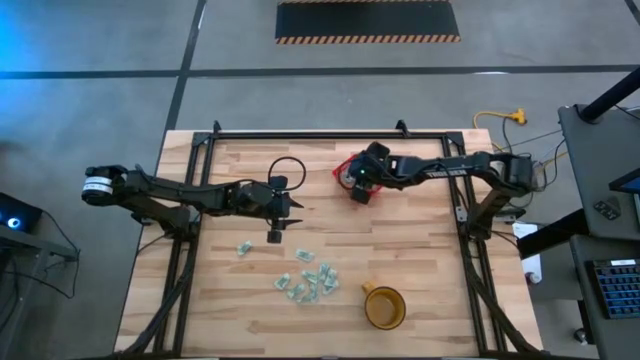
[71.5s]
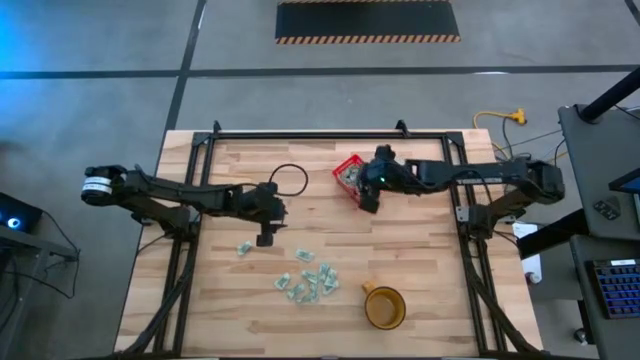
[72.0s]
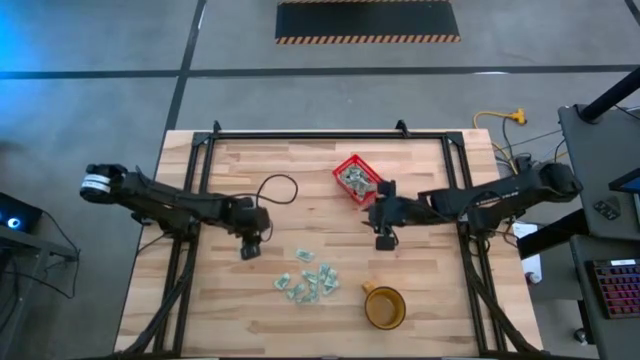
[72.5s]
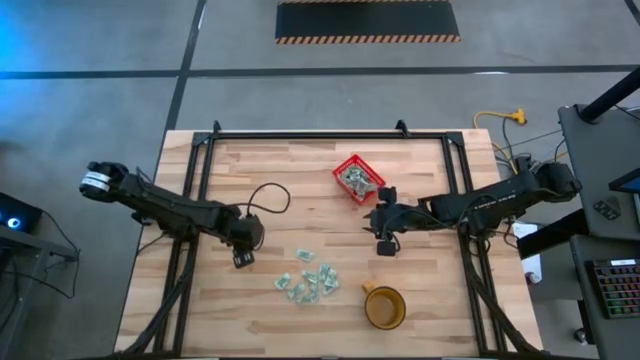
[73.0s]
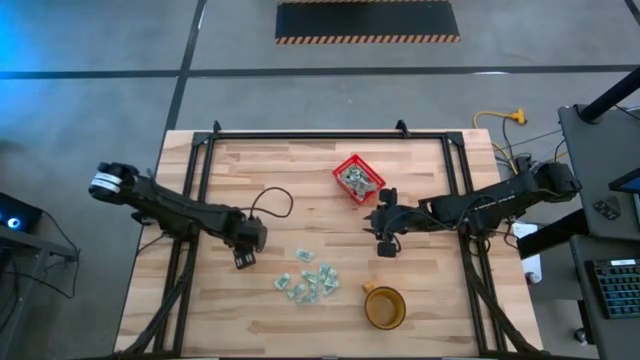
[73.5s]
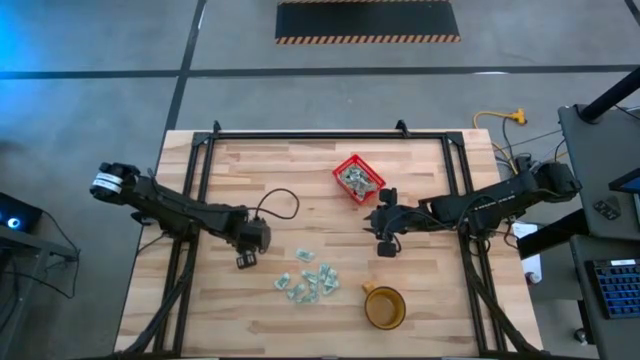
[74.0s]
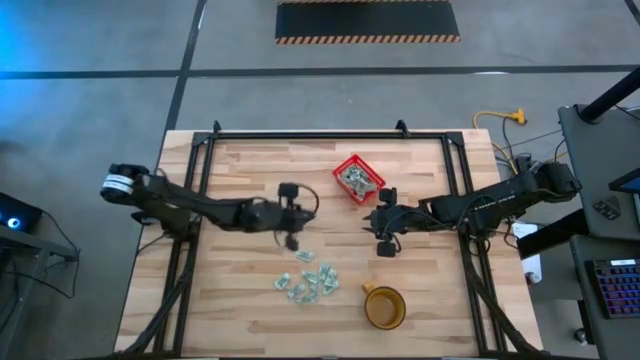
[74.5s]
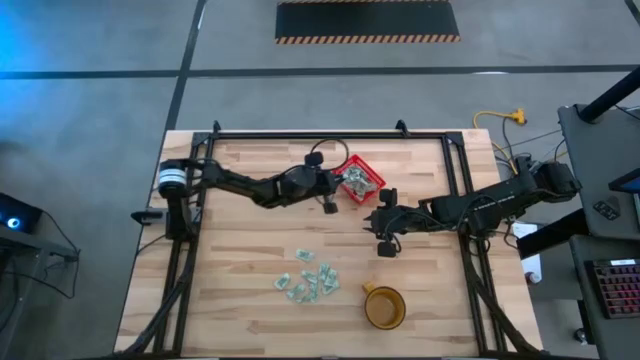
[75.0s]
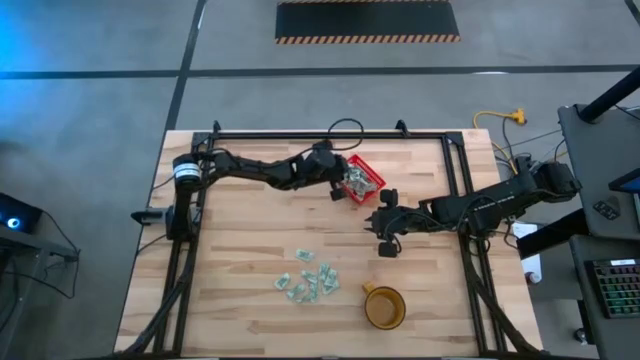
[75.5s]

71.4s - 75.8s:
Task: Pick and place Stevia / Truvia into bins
Put the stevia packet into the red basket

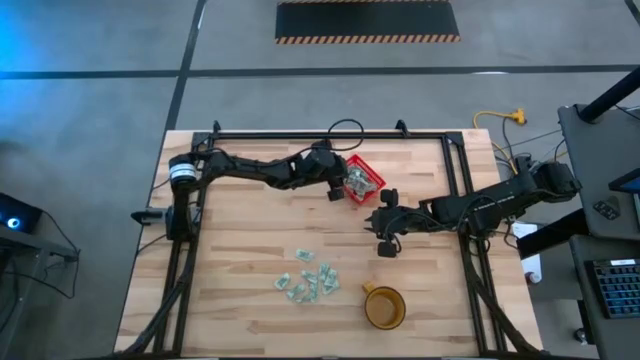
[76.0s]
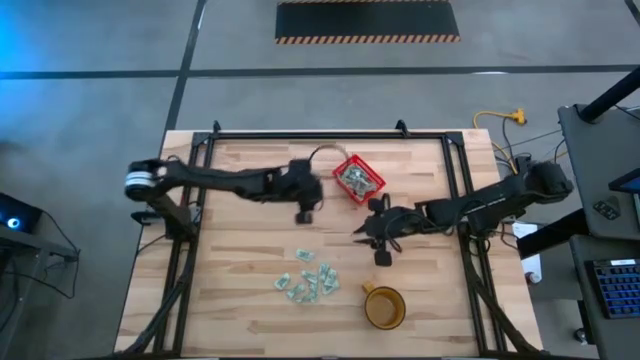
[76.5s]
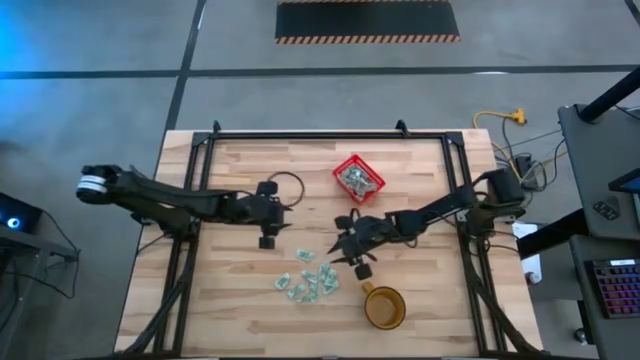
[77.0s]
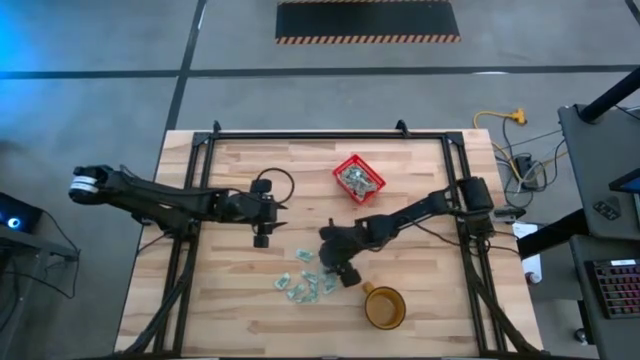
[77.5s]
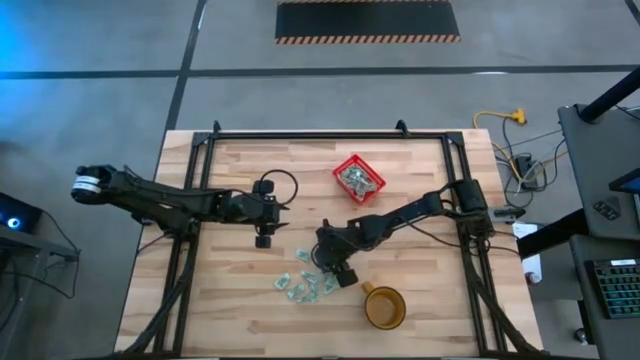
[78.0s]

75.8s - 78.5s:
Put the stevia packet into the red basket

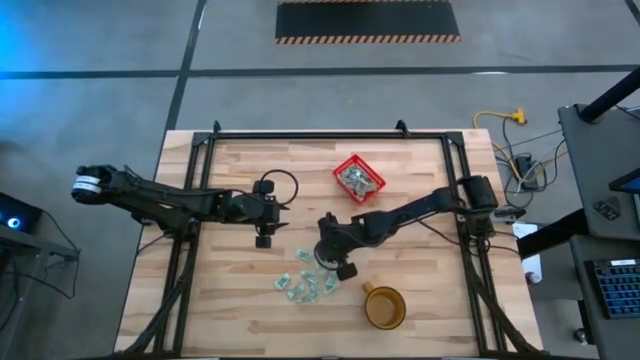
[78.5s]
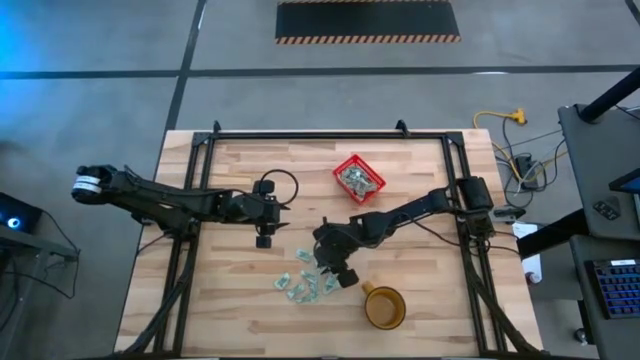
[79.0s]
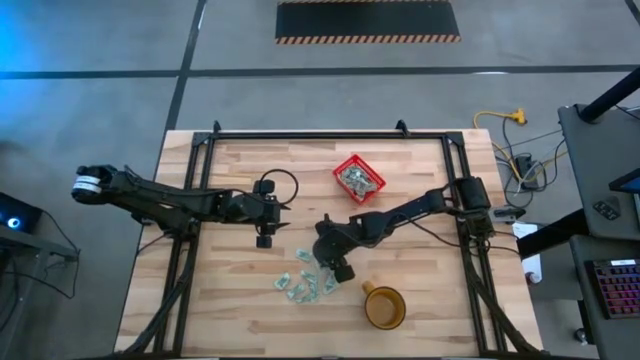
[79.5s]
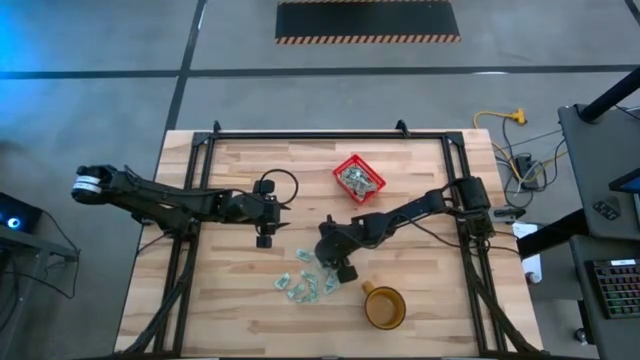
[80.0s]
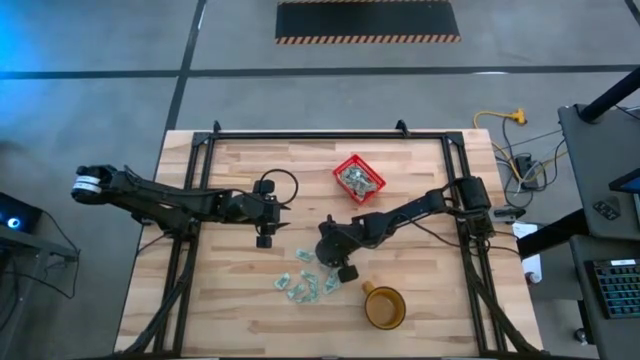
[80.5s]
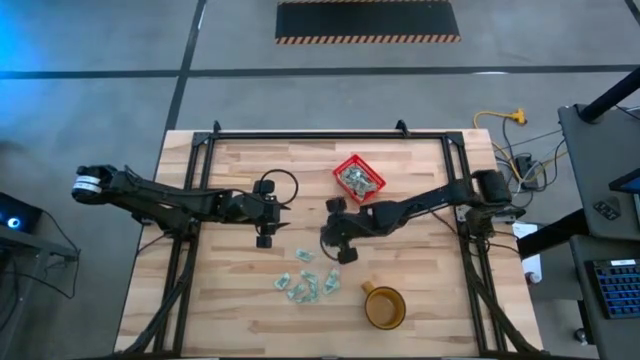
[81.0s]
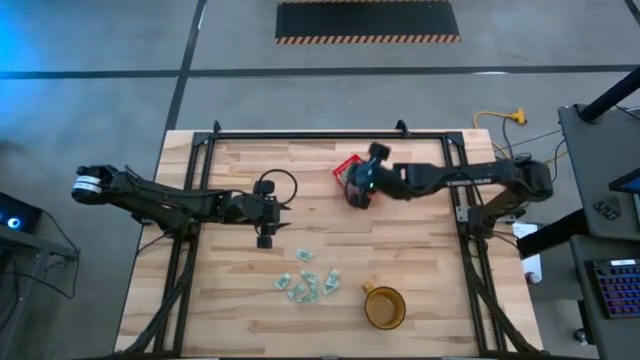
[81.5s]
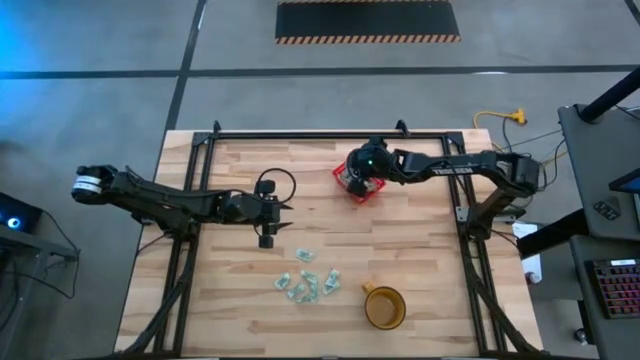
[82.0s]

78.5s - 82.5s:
Put the stevia packet into the red basket

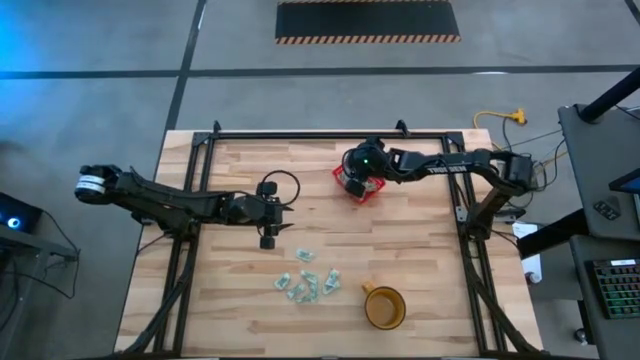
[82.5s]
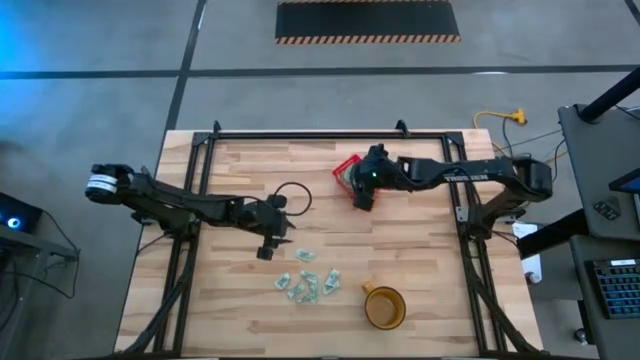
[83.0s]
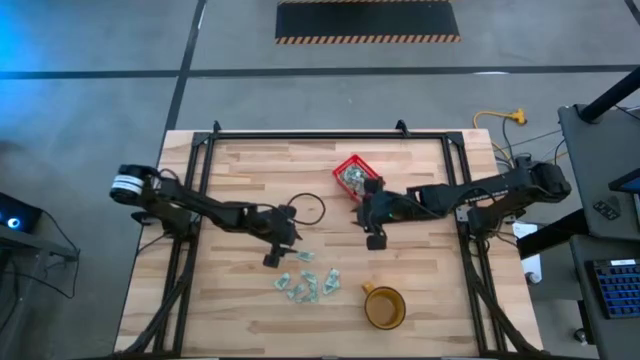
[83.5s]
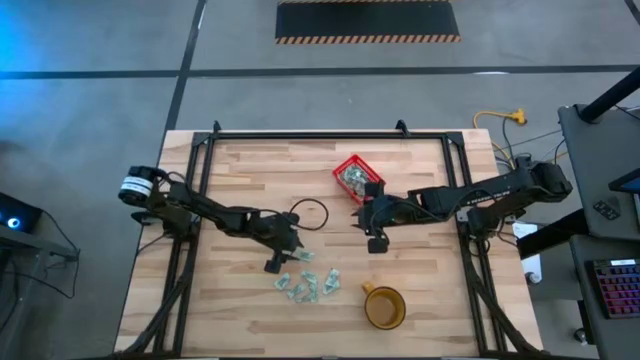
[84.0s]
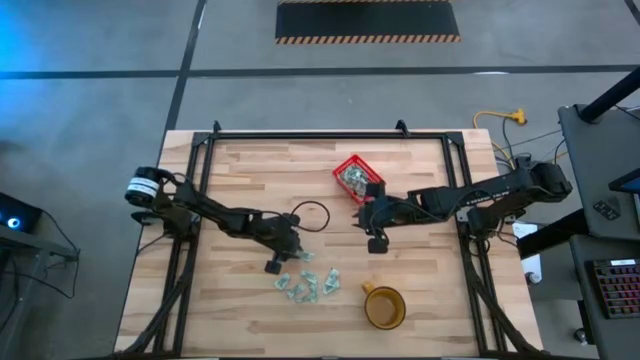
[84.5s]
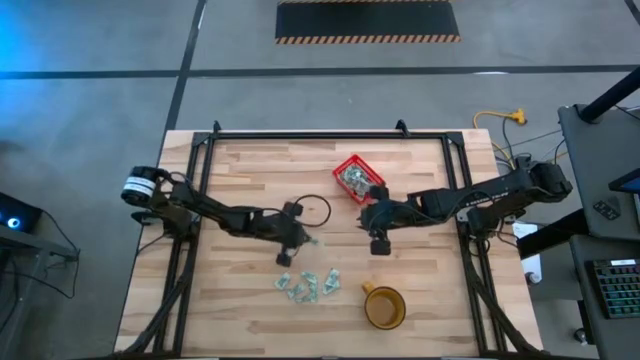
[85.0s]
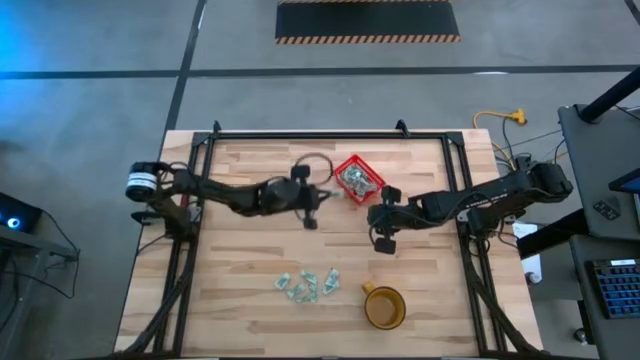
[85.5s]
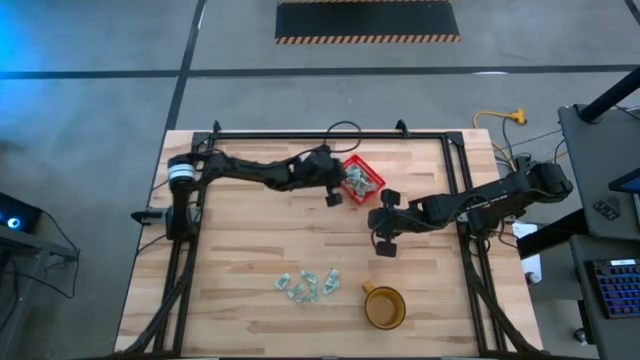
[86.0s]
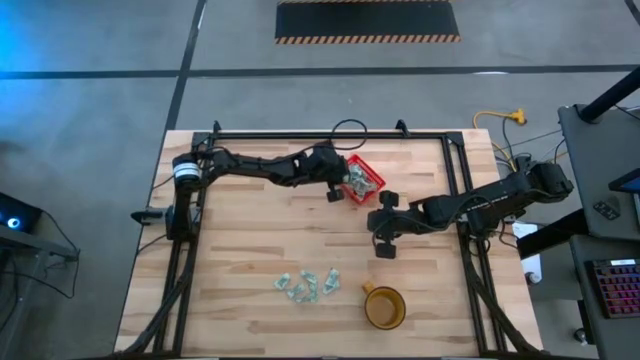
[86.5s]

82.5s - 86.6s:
Put the stevia packet into the red basket

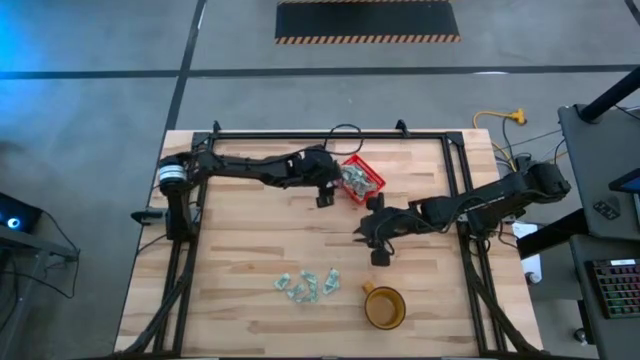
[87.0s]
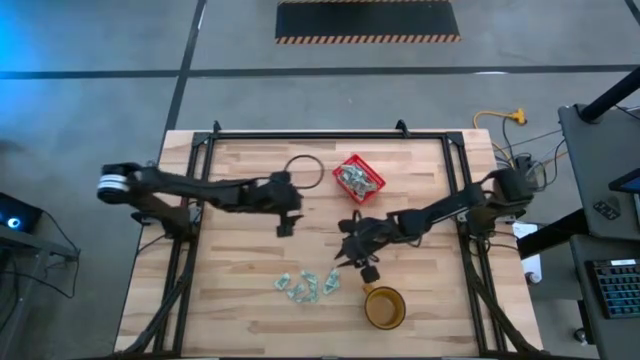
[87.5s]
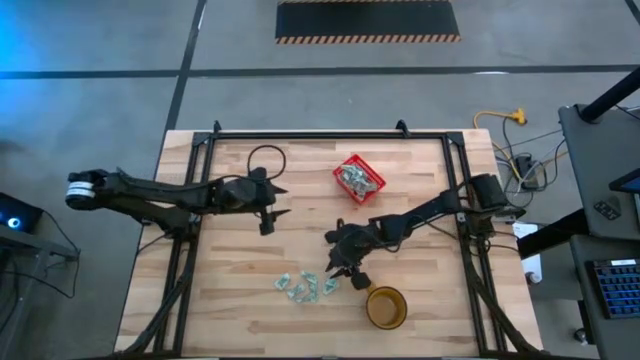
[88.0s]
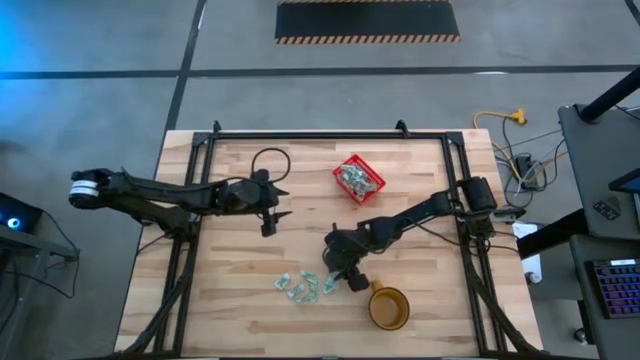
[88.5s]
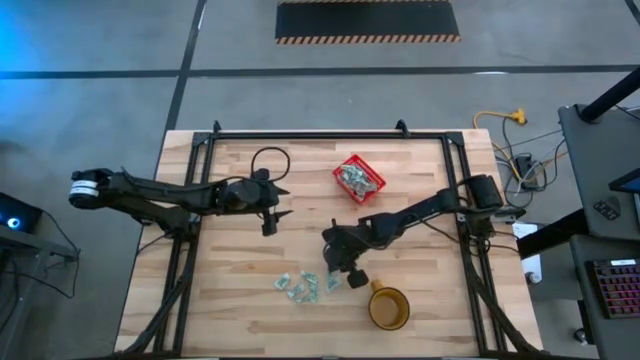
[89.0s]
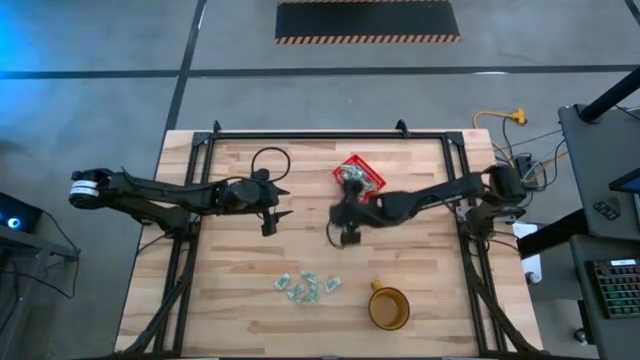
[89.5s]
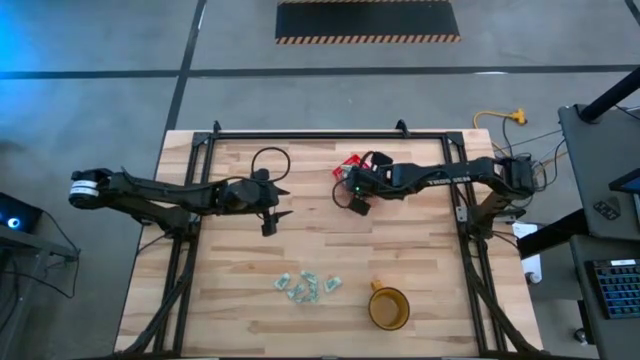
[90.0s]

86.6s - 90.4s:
Put the stevia packet into the red basket

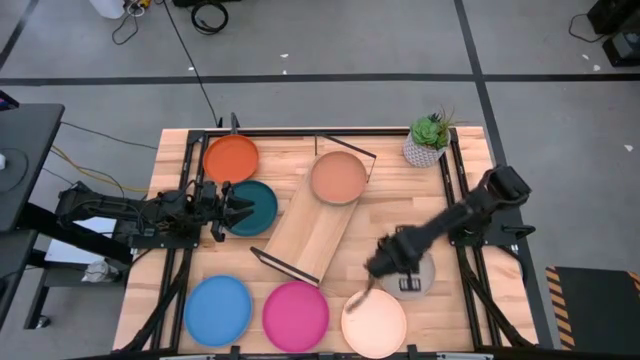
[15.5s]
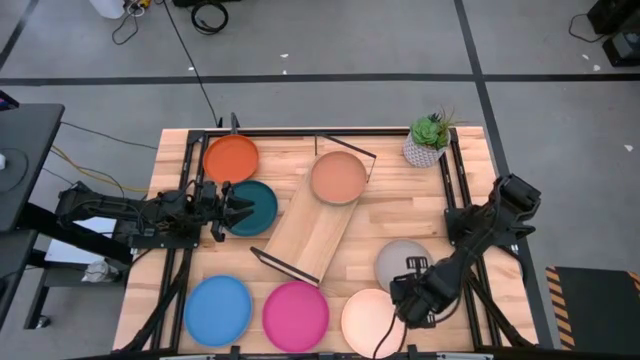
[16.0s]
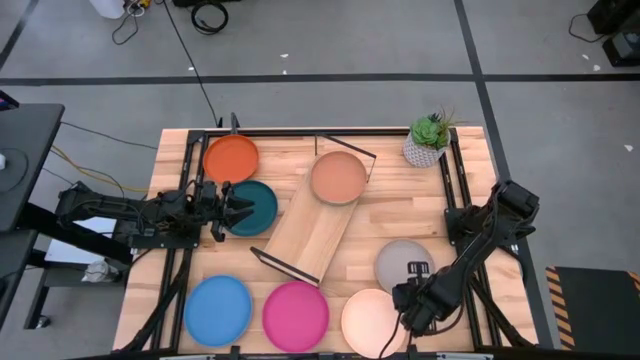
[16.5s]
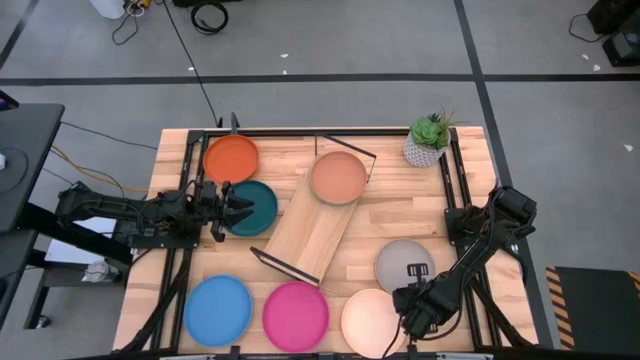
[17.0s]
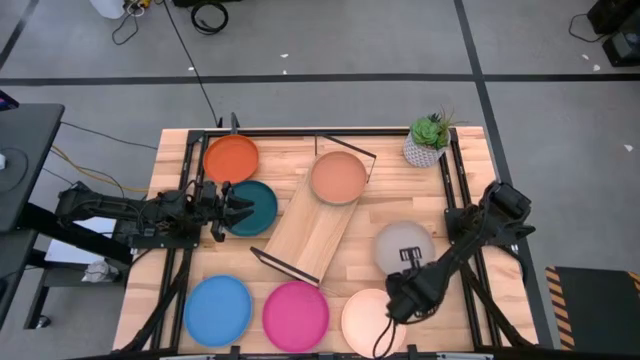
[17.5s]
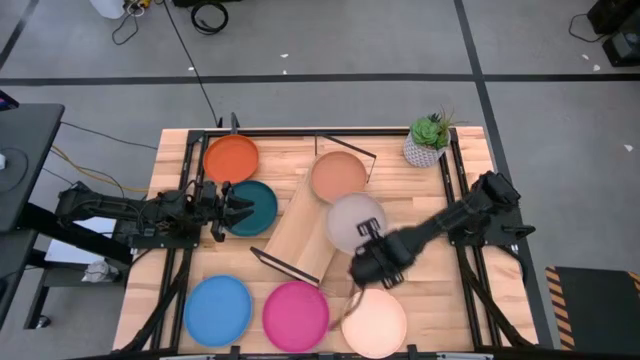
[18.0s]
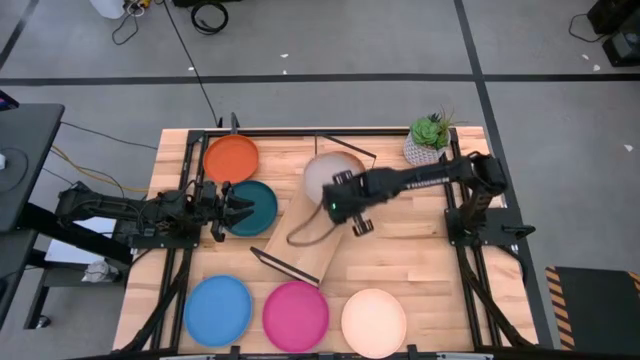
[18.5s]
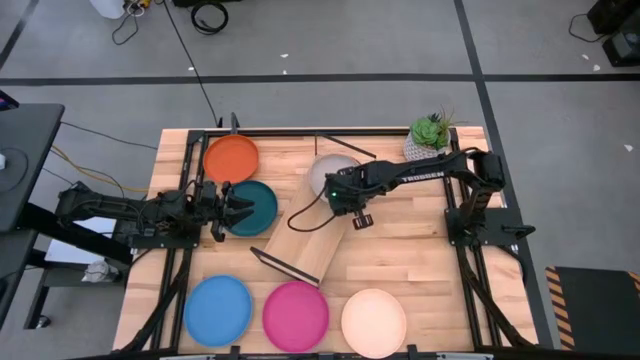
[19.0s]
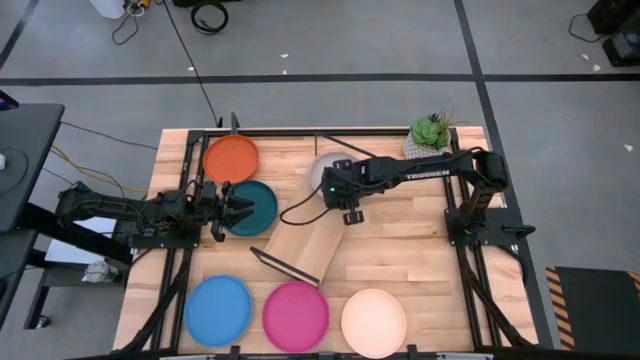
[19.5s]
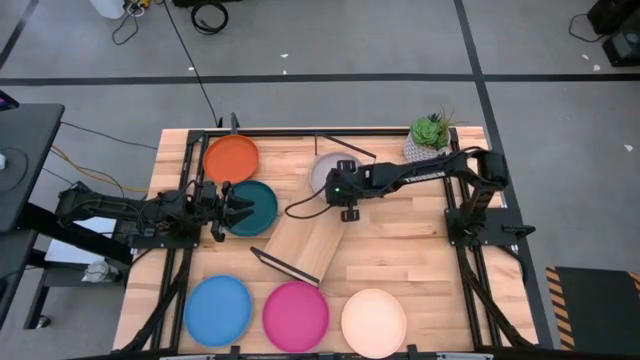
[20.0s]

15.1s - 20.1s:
Task: Place and stack plates onto a shelf
Stack the gray plate on the top of the brown plate on the shelf
